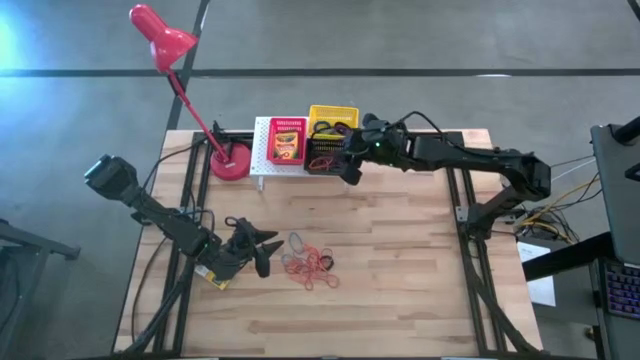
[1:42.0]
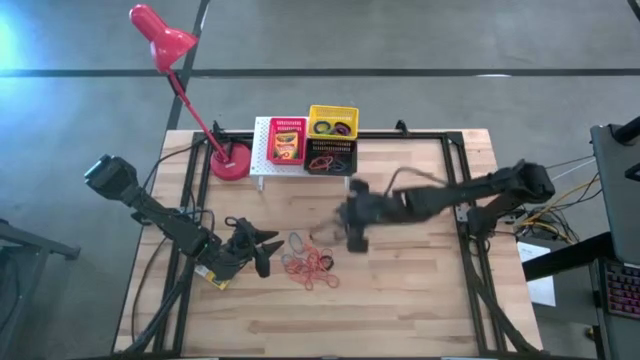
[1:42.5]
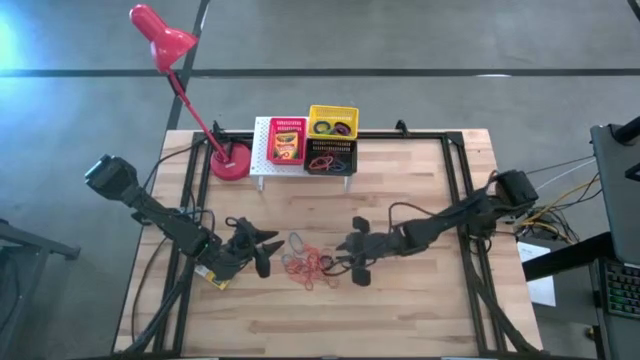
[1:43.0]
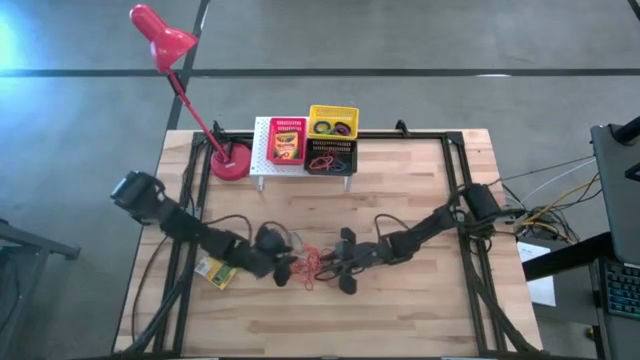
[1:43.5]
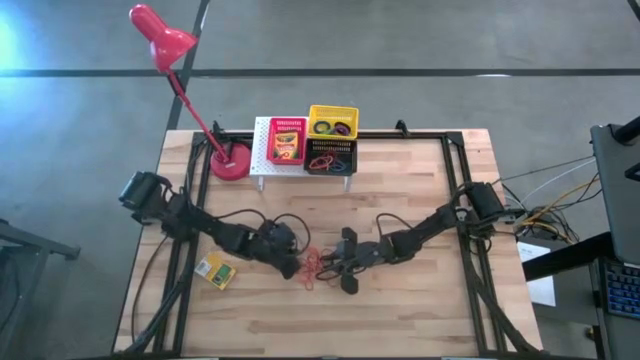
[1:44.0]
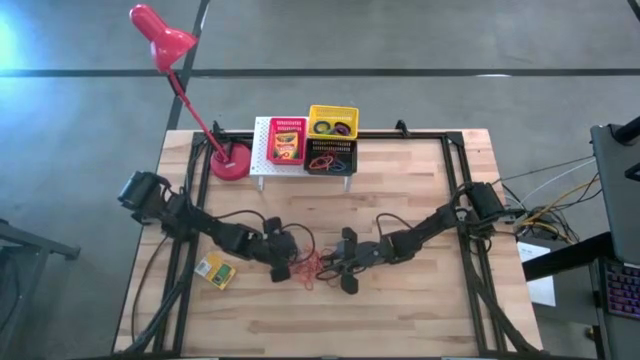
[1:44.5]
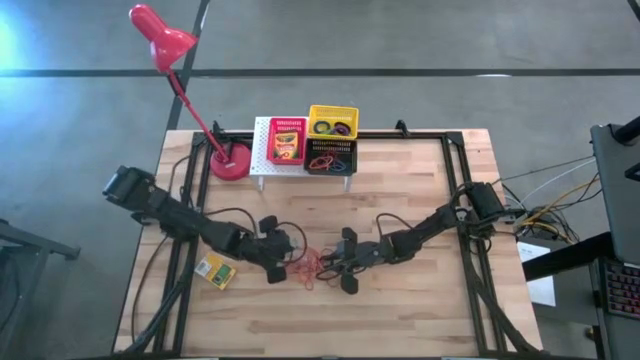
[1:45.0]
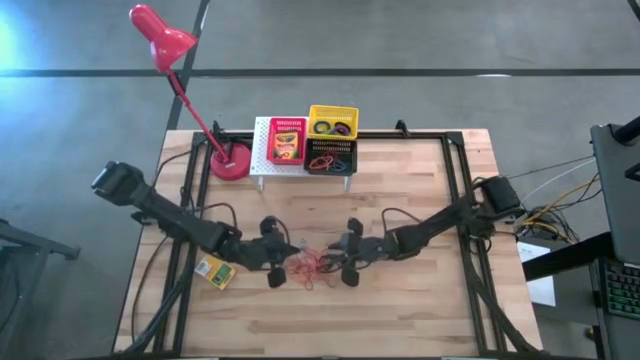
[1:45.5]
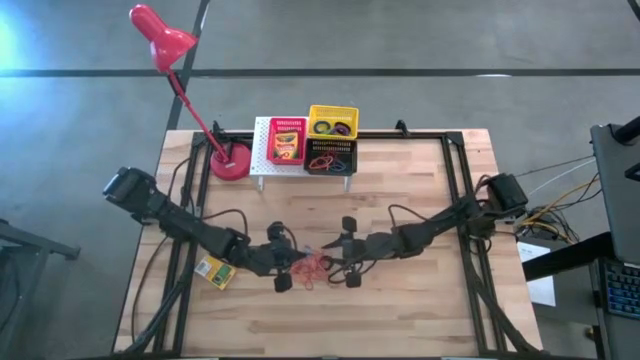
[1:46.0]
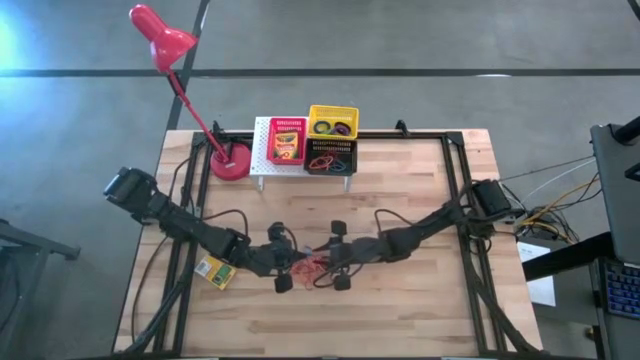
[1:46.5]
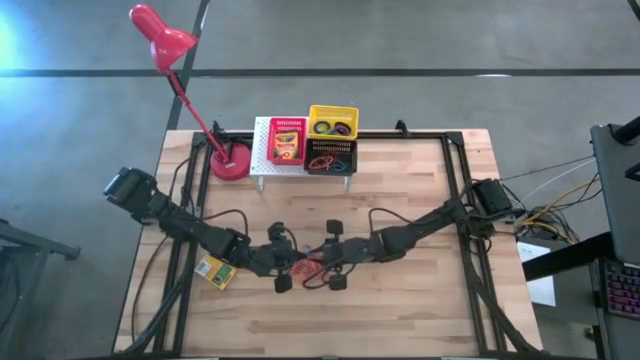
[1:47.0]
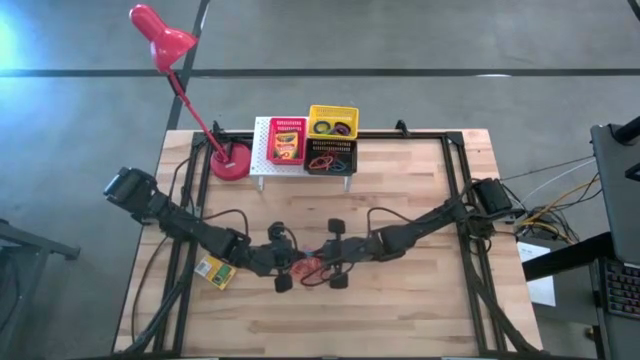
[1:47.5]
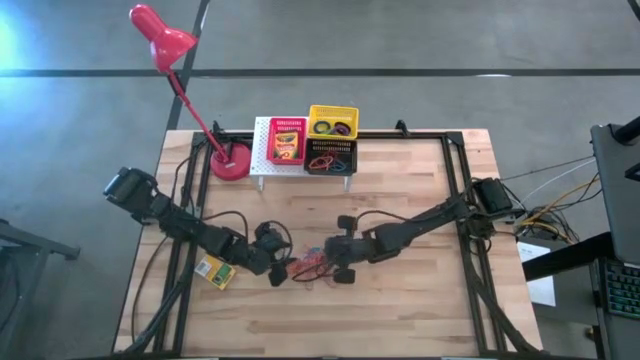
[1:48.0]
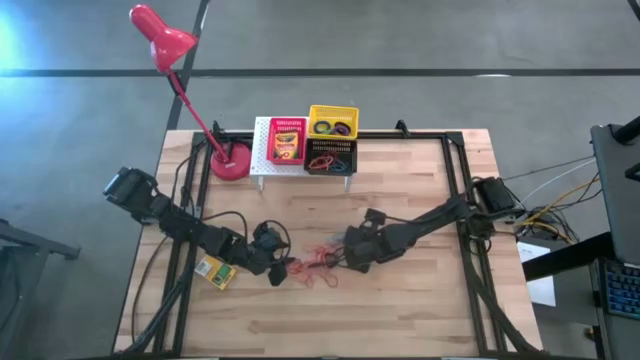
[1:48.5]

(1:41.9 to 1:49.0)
Task: Pick & Place Office Desk Supplies
Put the blue rubber band into the black bin on the shelf

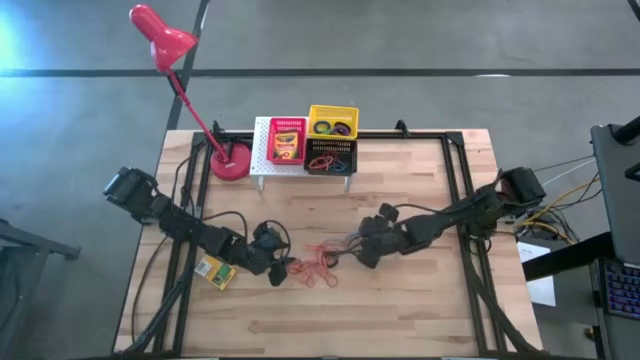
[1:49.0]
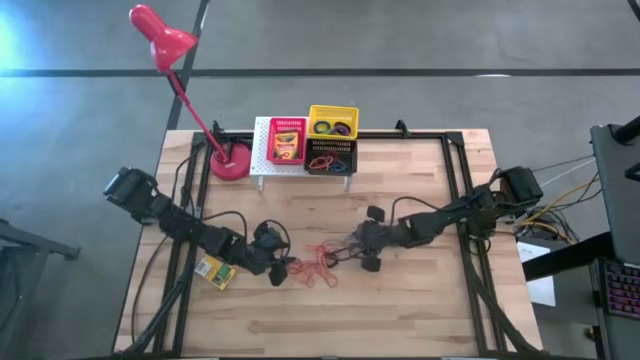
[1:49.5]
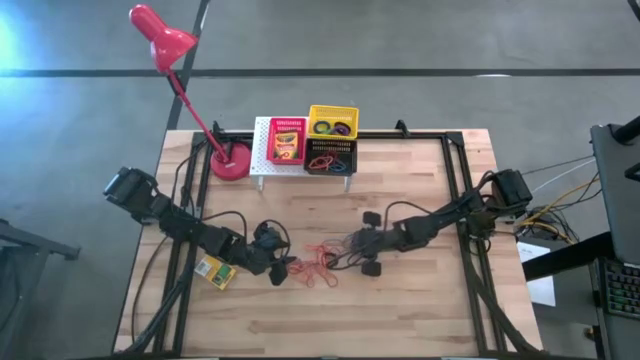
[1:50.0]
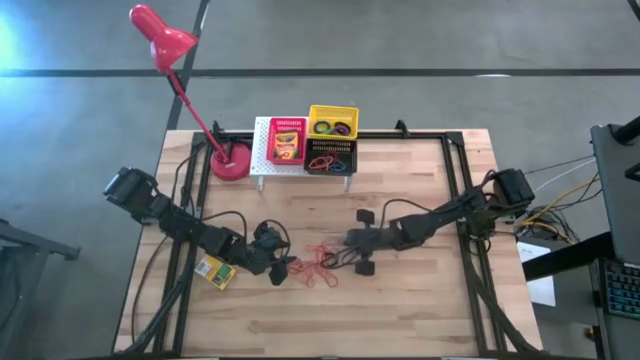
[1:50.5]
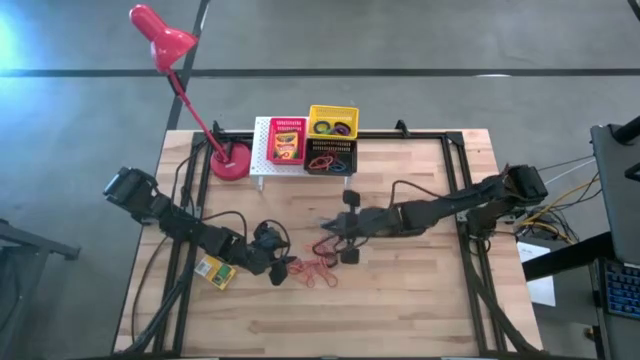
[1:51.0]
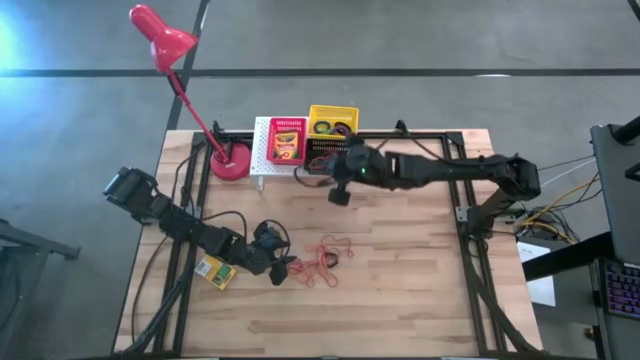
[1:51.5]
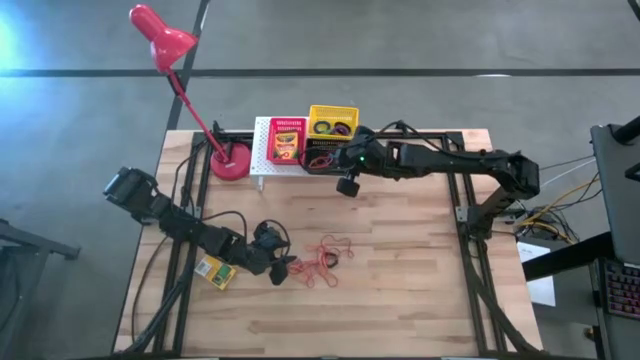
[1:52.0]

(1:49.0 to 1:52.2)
Put the blue rubber band into the black bin on the shelf

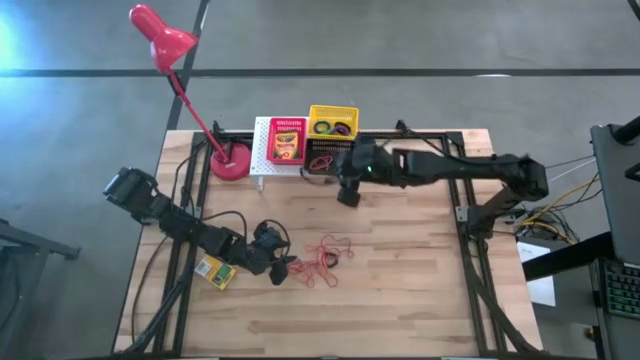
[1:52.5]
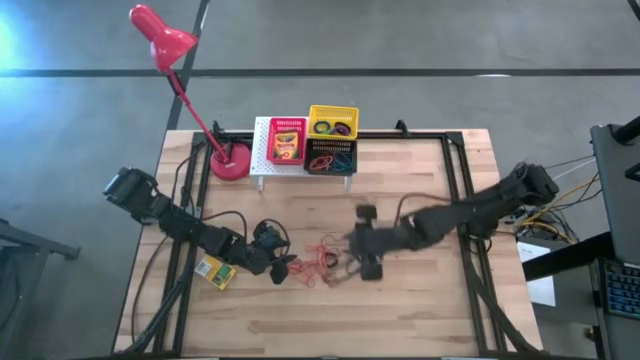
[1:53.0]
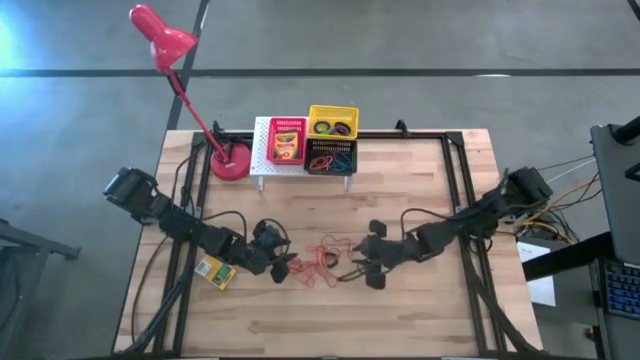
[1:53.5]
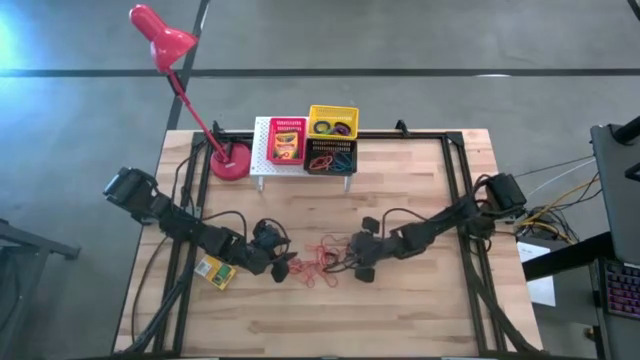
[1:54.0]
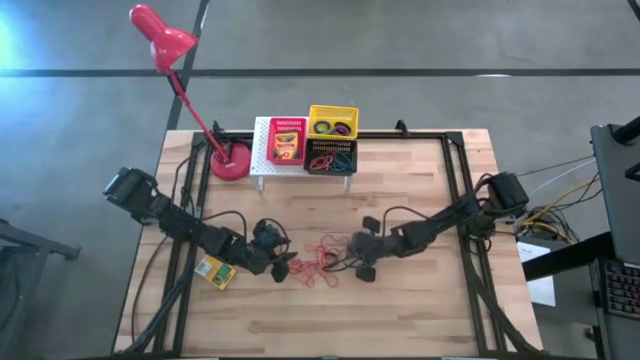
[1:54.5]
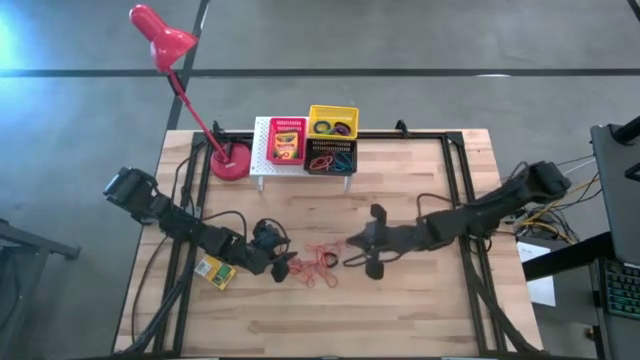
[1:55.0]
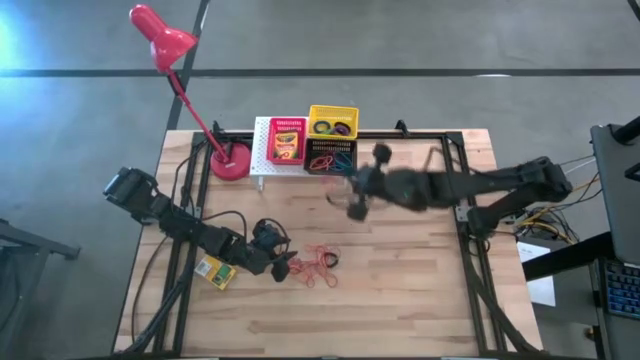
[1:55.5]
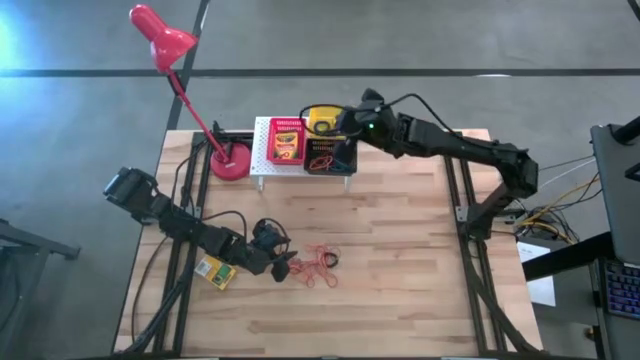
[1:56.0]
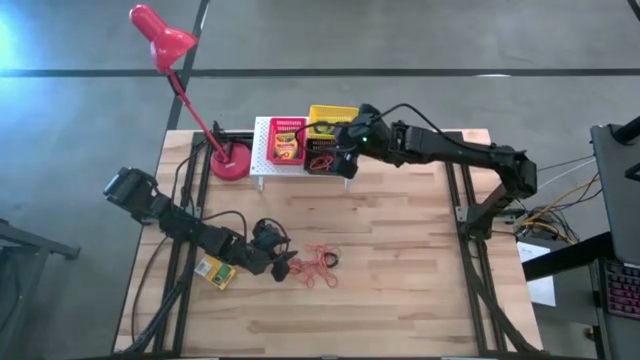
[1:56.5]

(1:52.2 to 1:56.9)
Put the red rubber band into the black bin on the shelf

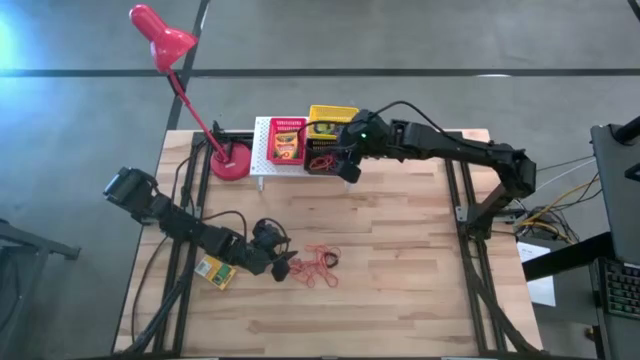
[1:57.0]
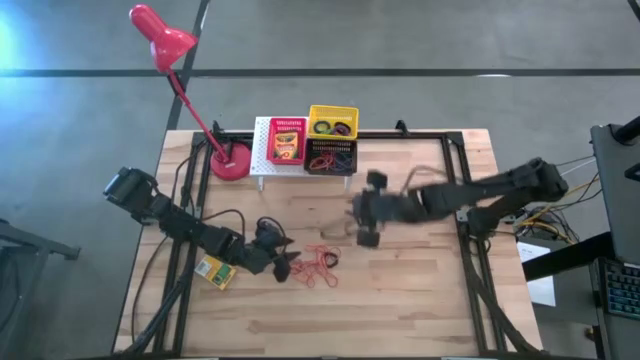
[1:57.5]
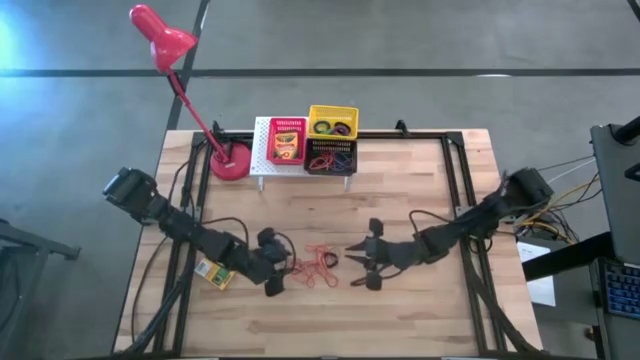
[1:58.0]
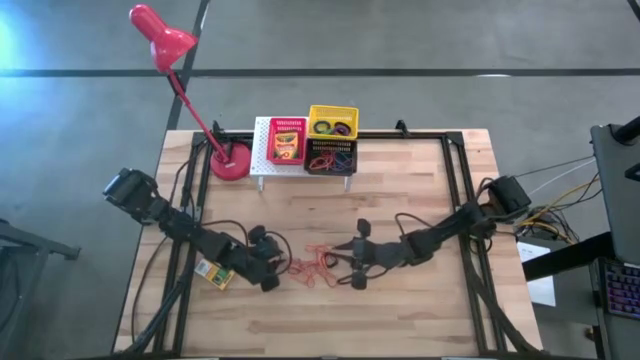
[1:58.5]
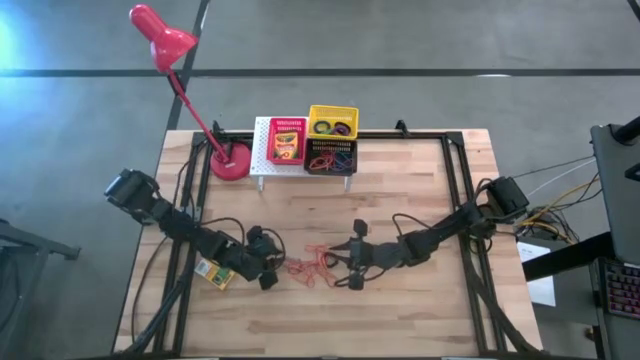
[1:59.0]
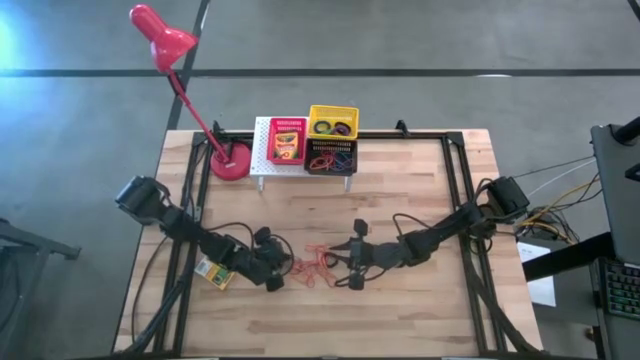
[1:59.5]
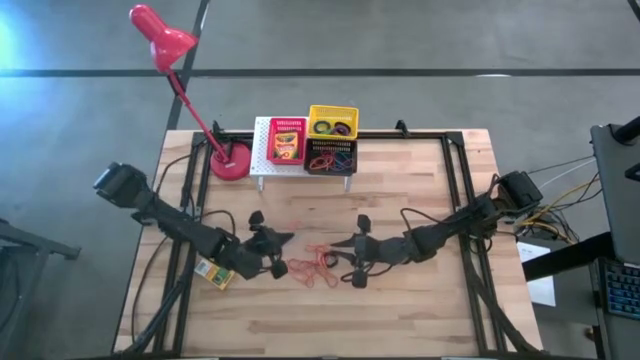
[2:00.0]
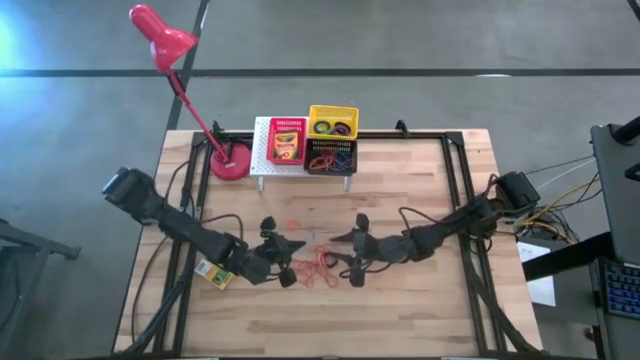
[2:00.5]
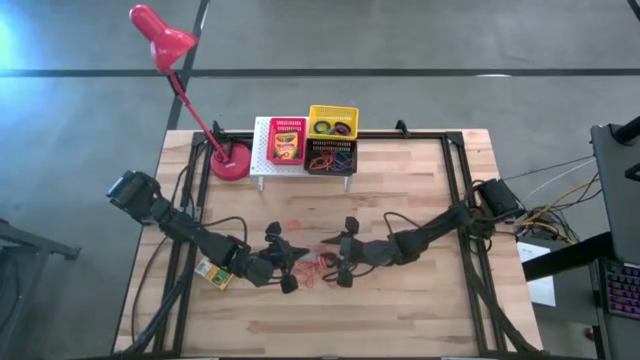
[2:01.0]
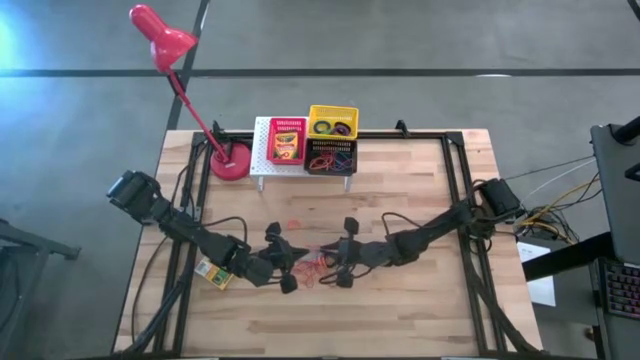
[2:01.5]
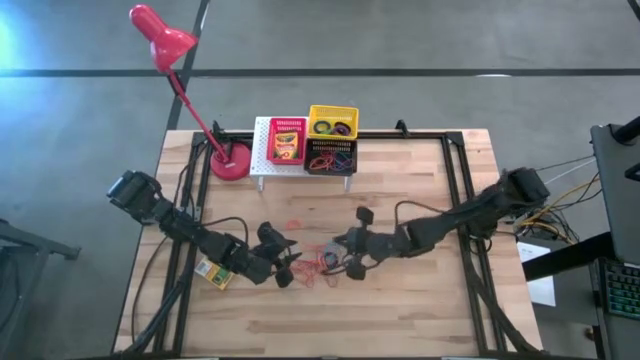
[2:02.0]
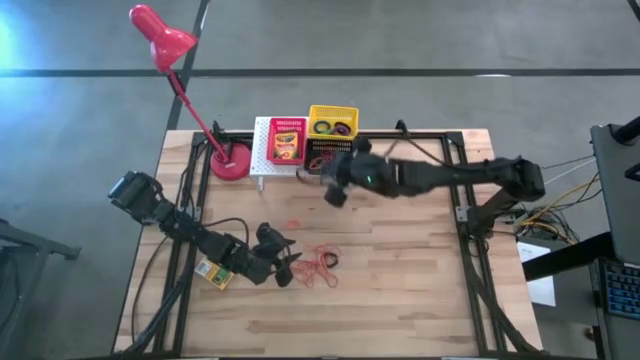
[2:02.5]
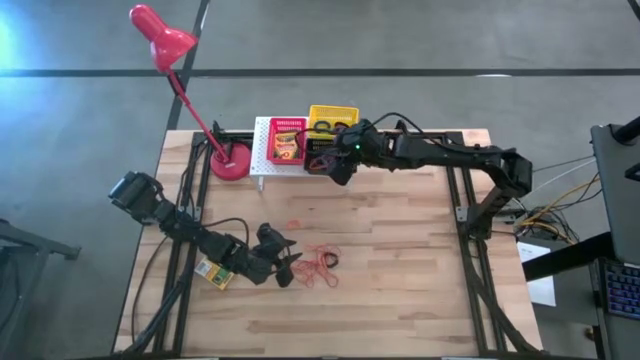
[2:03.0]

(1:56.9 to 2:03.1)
Put the blue rubber band into the black bin on the shelf

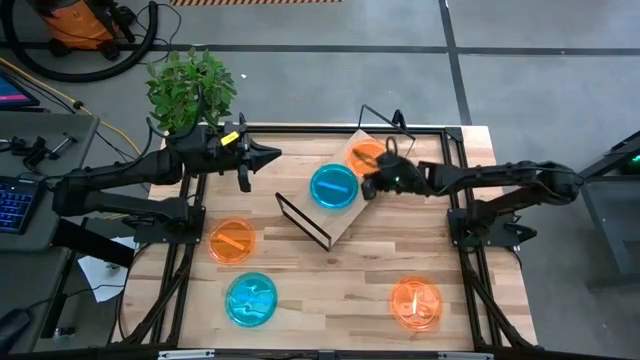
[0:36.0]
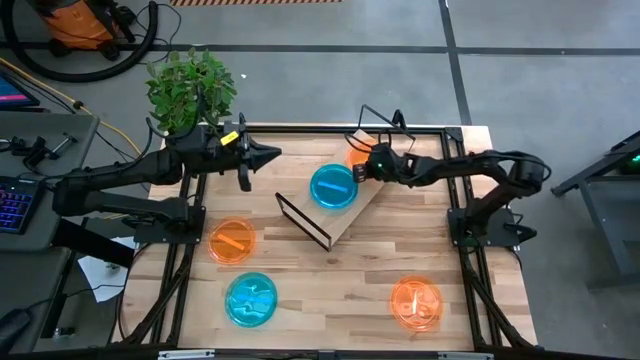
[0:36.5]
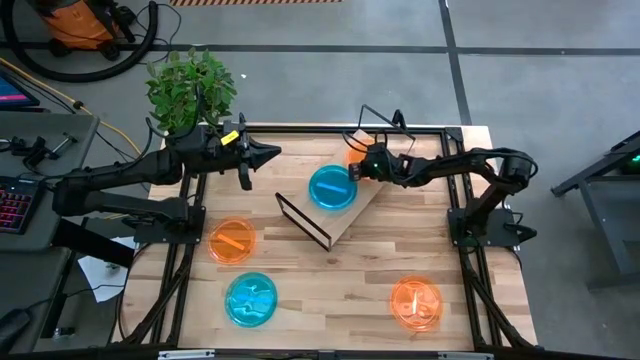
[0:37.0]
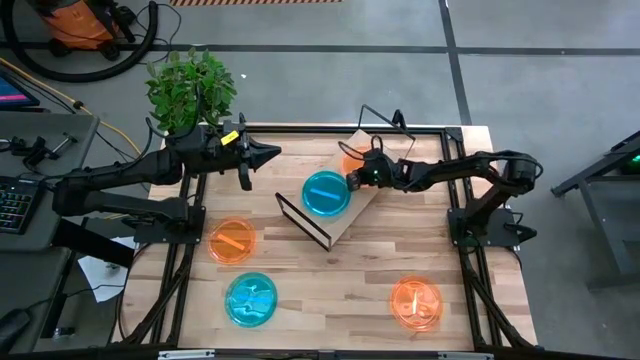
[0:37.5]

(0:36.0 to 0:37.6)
Task: Place and stack plates onto a shelf
Adjust the orange plate on the shelf
